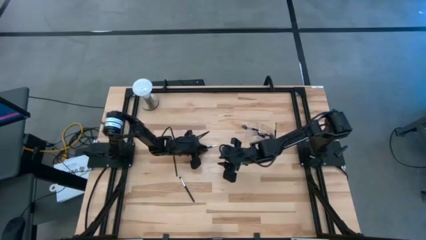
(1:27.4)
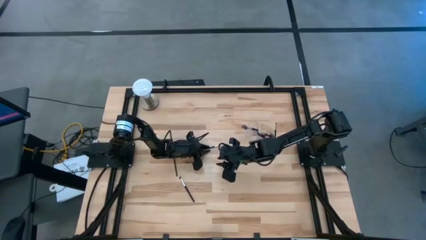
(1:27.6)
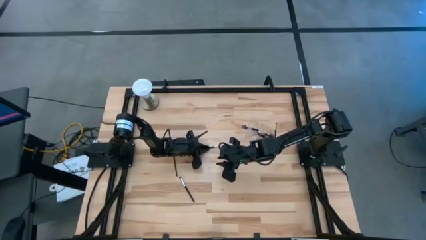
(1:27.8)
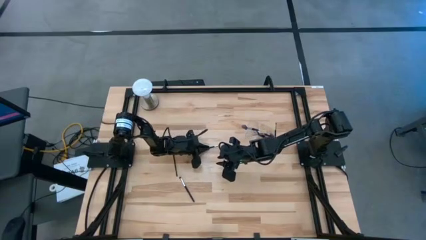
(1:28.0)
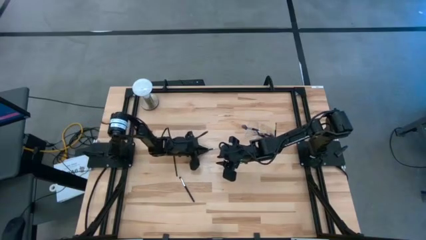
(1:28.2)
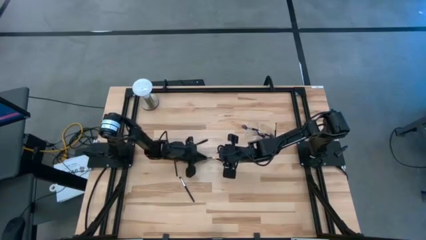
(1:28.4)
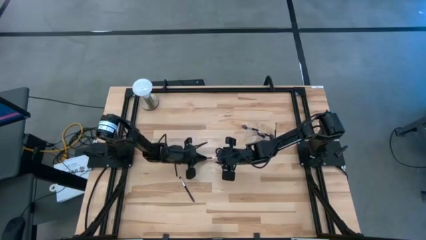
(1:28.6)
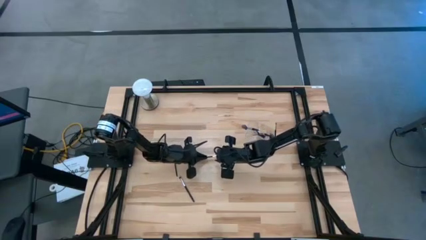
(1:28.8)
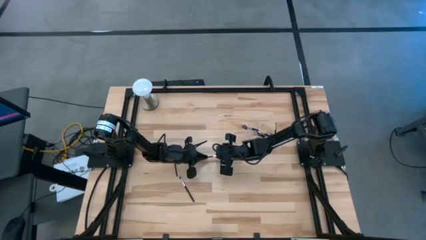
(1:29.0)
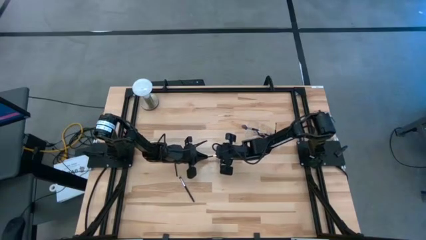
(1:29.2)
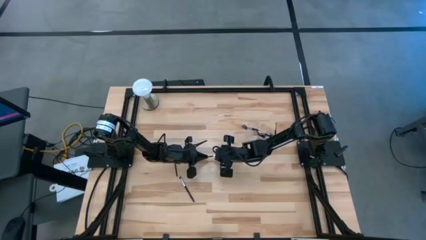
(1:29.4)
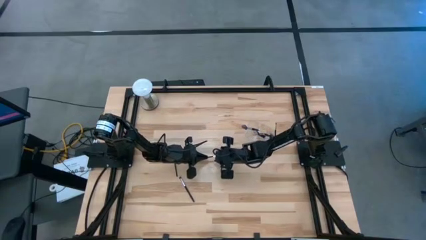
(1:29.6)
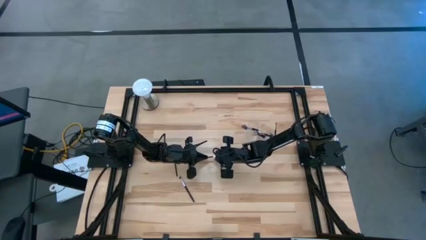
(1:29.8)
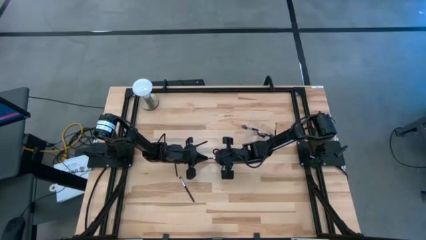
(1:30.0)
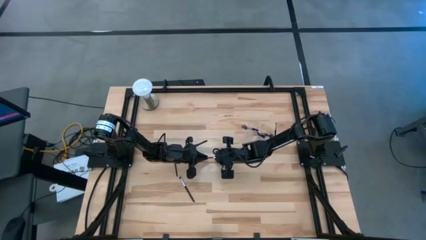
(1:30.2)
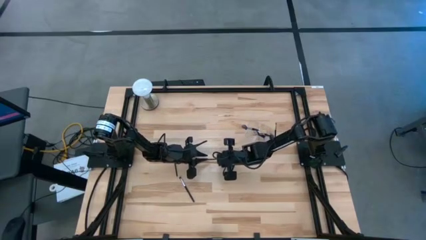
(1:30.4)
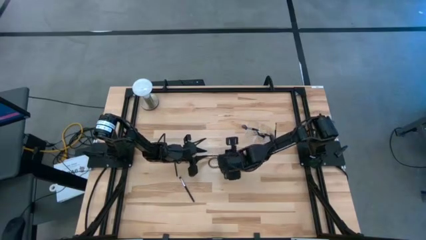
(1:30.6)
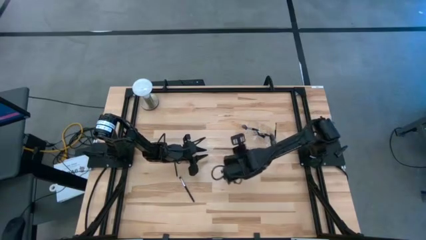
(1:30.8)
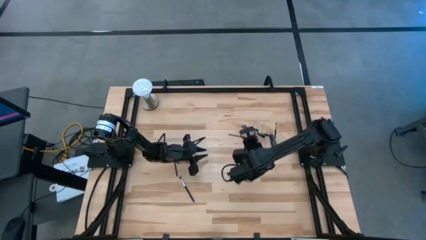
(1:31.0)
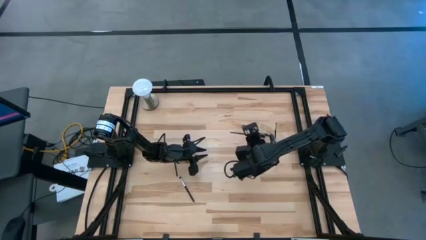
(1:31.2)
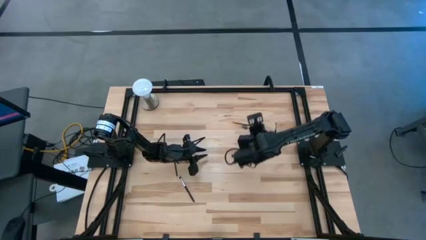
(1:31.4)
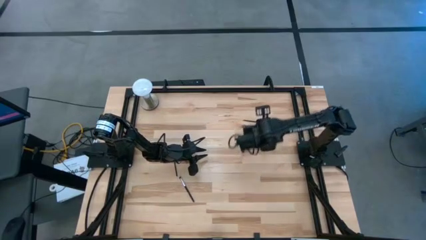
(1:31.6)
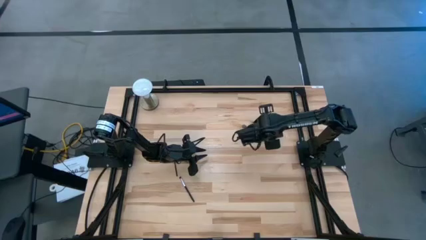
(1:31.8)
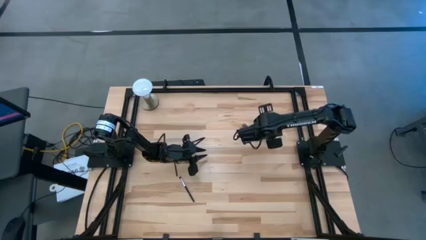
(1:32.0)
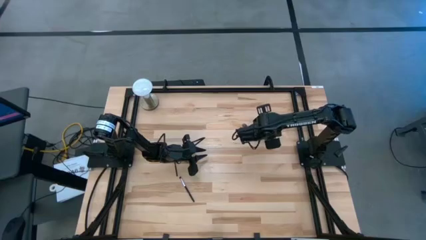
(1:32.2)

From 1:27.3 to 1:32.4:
Task: Pick & Place Makeup Supplies
Put the black makeup brush into the transparent organizer

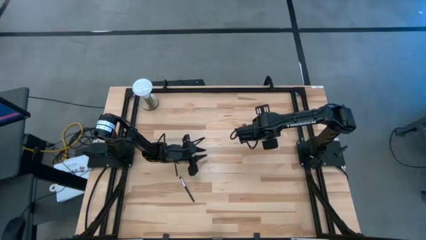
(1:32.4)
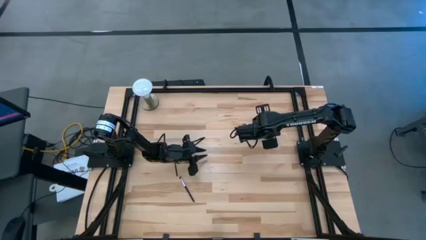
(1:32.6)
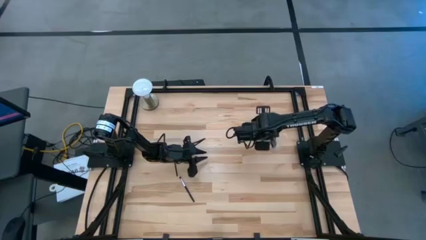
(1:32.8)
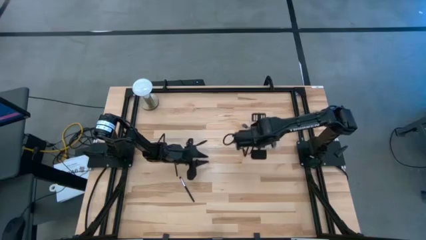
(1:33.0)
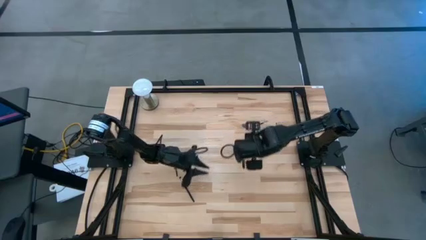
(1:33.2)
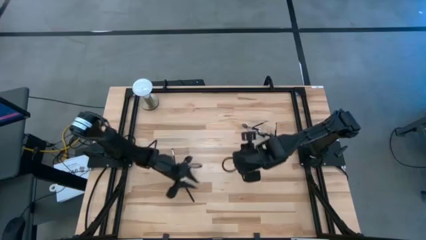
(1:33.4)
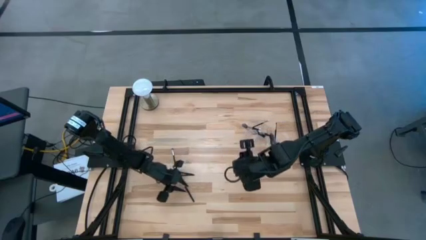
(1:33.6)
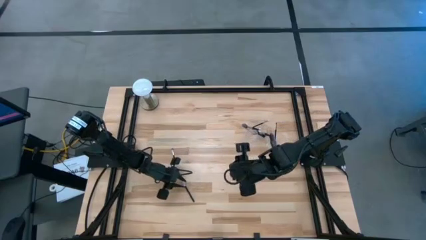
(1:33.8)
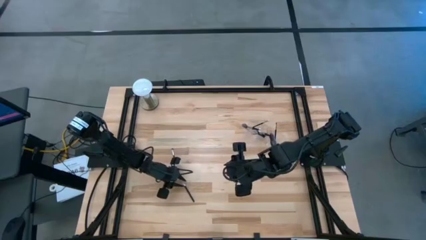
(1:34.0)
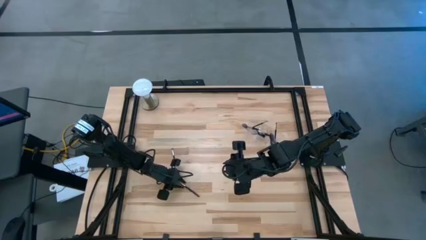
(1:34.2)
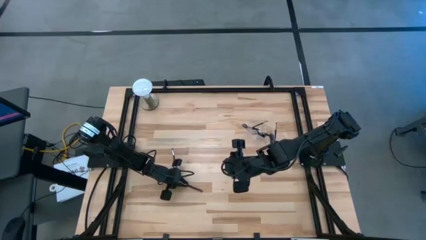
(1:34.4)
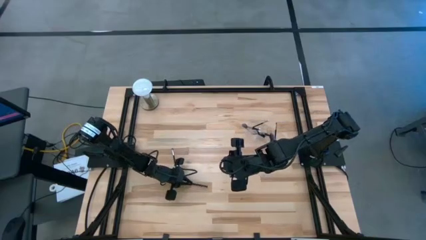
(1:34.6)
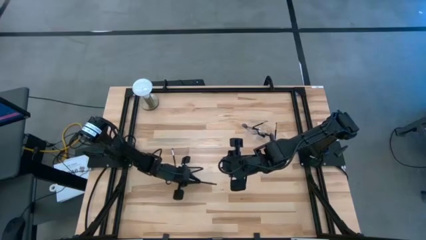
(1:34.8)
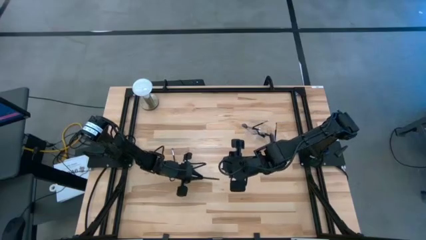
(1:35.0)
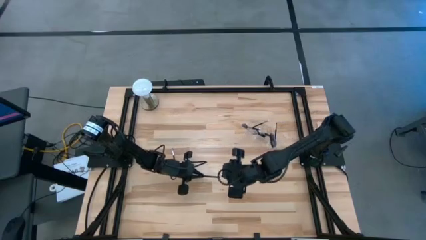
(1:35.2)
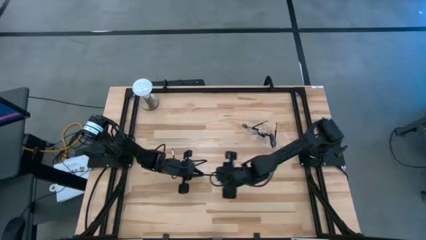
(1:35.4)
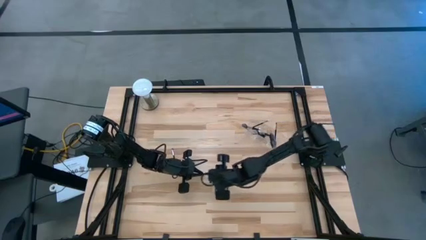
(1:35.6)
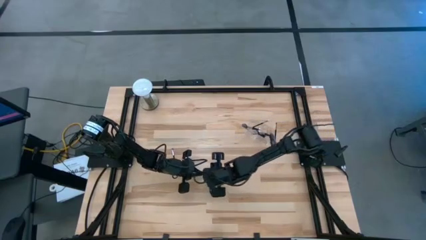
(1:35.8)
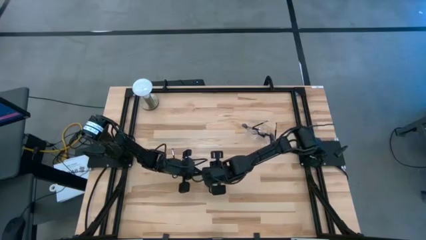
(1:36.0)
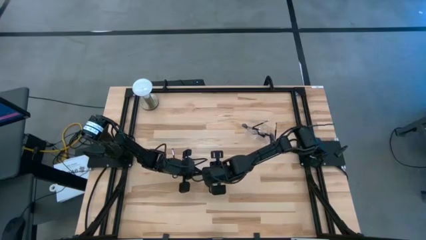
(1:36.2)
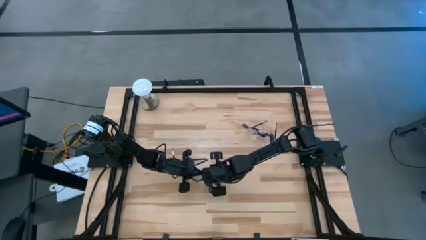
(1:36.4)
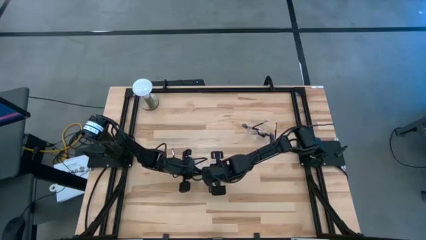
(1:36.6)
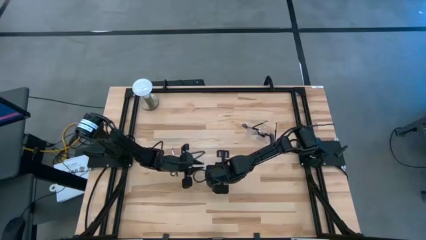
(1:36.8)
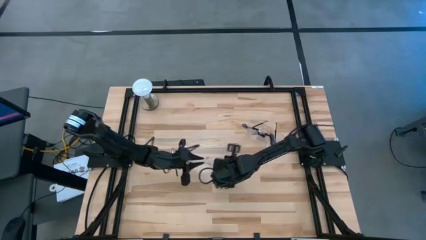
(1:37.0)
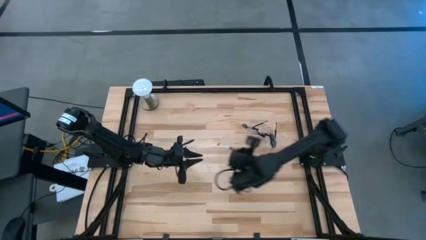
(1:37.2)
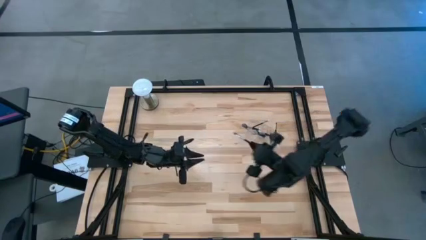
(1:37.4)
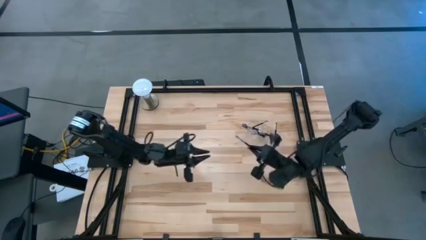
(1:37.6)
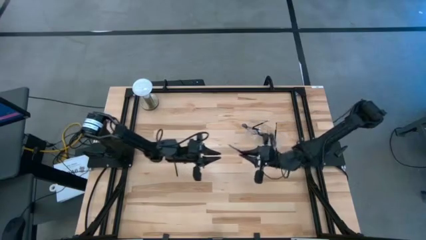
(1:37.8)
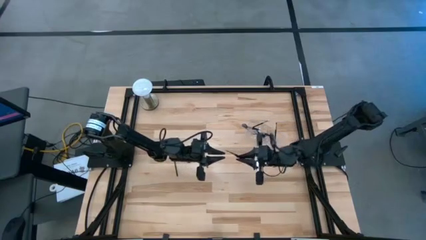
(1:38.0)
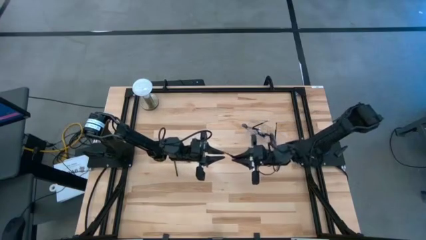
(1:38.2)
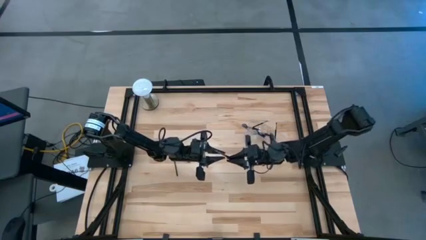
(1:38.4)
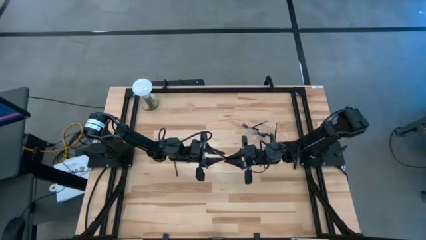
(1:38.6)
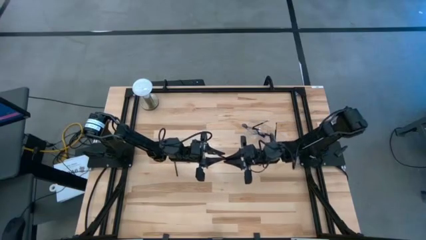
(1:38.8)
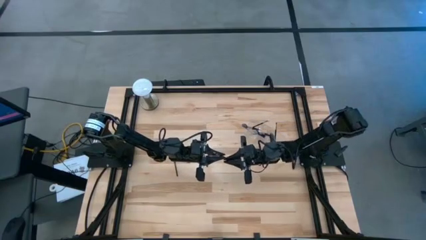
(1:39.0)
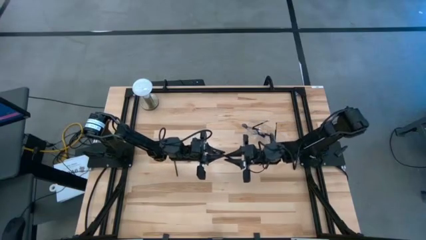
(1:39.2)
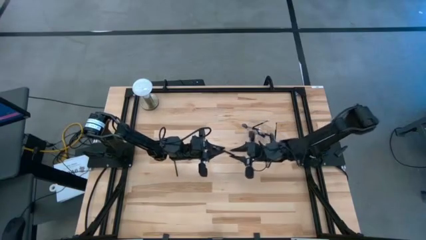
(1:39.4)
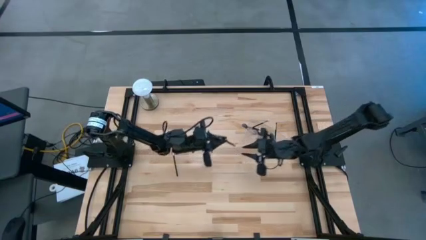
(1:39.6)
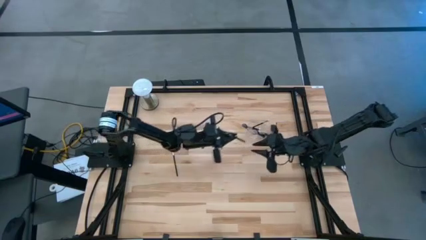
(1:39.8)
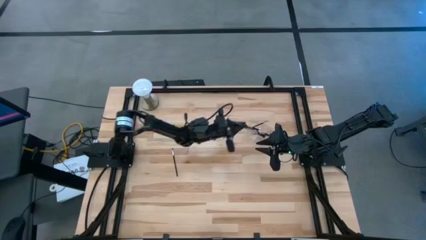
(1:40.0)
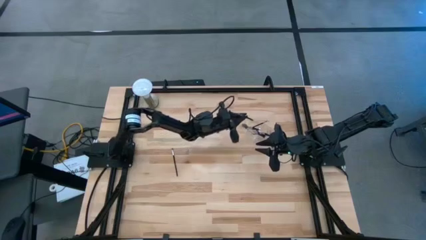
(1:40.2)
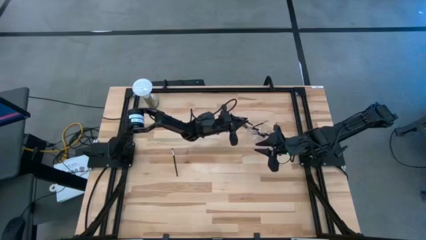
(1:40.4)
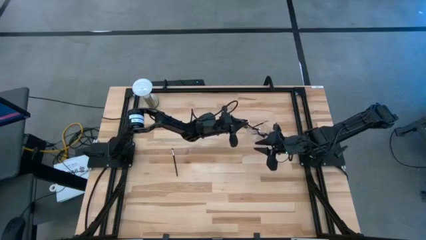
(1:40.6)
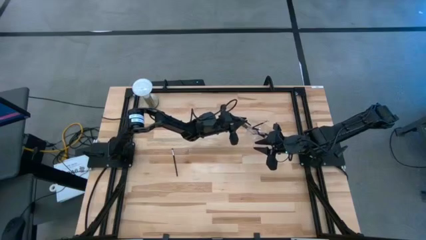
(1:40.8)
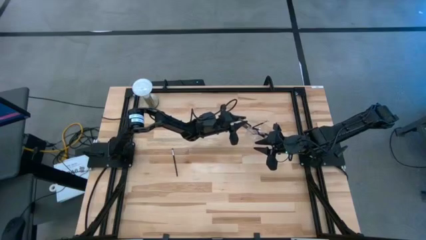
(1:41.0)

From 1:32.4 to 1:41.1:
Put the black makeup brush into the transparent organizer

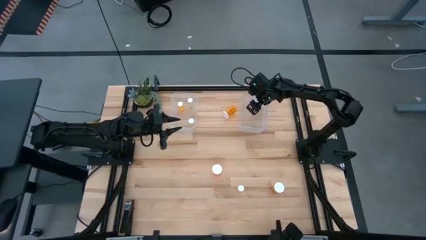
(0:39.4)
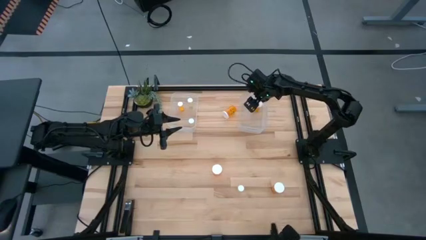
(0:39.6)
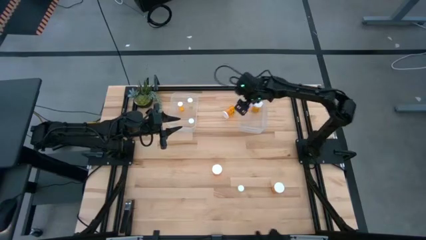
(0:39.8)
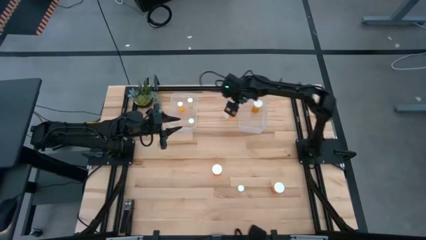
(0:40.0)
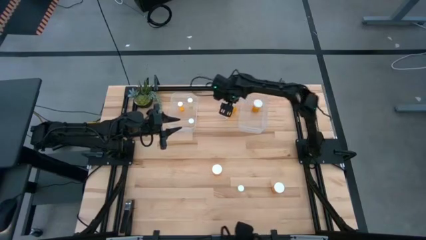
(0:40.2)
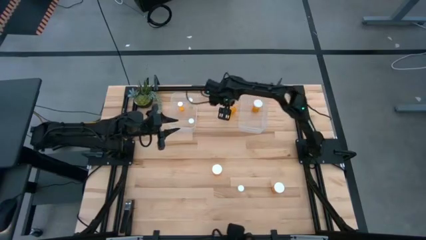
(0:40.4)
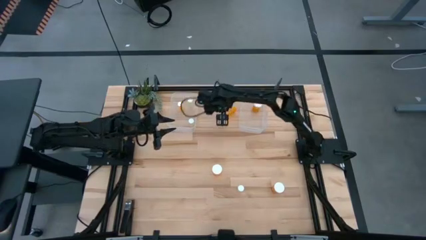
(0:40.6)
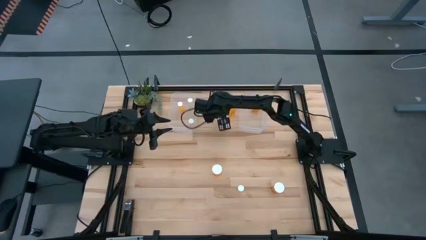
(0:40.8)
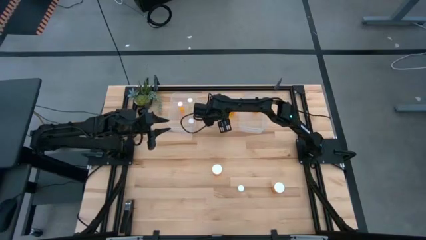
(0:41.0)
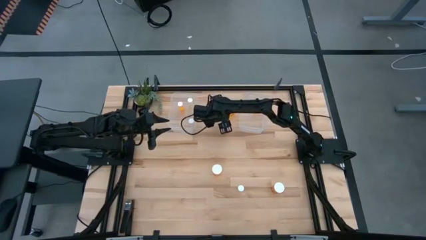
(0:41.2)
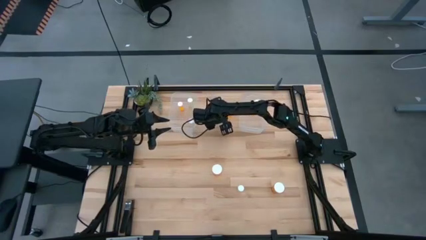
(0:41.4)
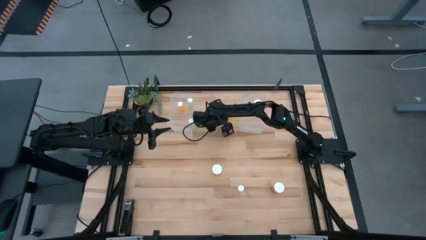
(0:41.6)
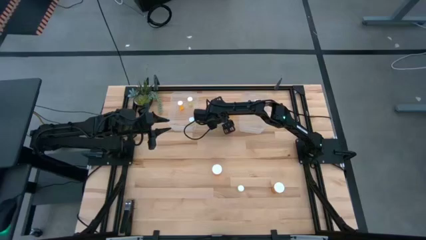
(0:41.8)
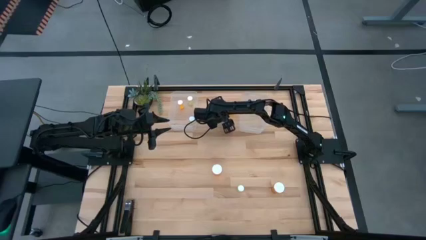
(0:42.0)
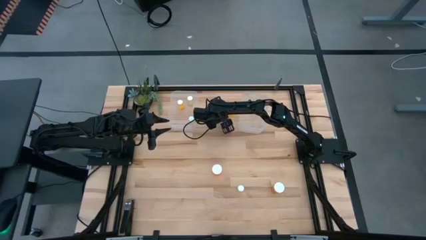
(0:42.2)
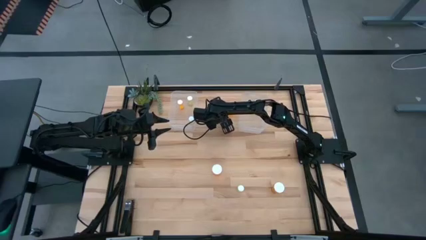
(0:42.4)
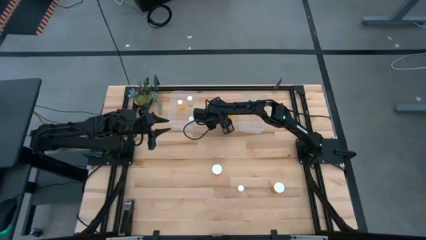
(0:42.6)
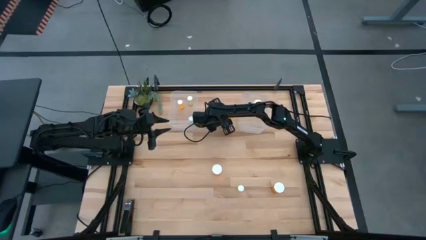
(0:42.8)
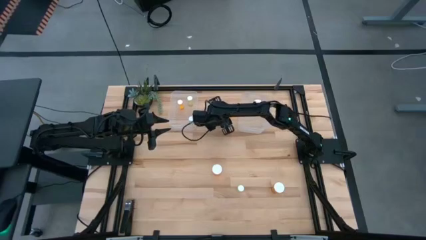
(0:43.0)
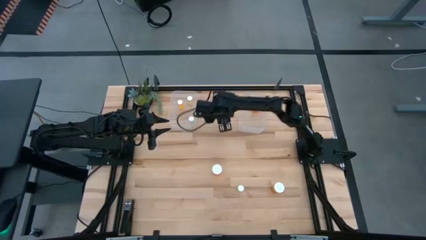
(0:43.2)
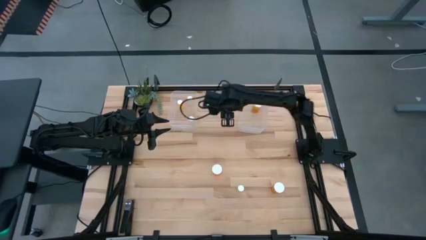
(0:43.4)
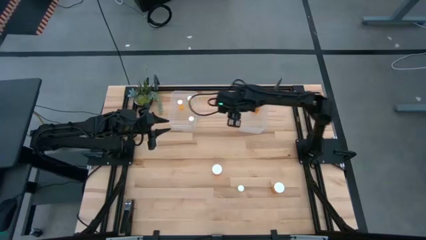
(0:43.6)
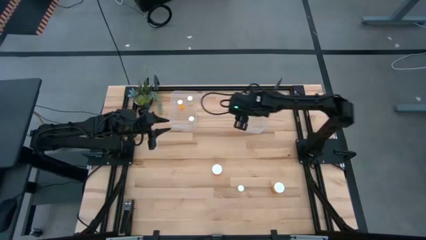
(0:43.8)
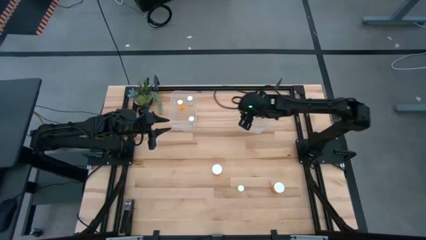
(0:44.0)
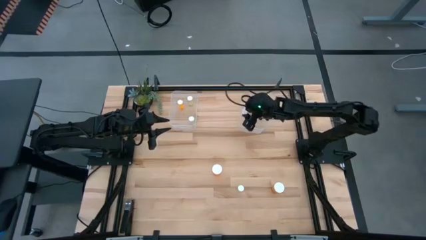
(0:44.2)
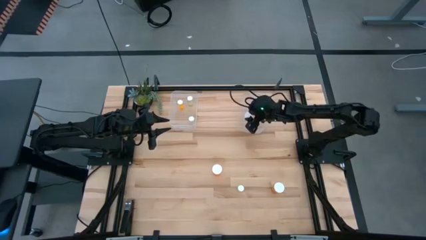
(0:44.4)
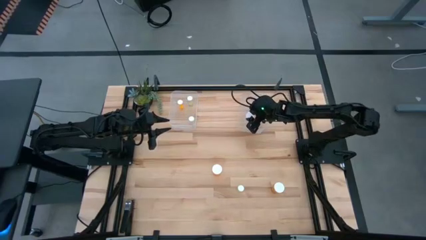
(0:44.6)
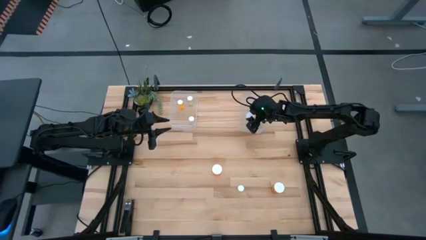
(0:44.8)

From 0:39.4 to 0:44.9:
Task: Pick and place medicine bottles into bin by pill shape (circle, oval)
Put the large orange pill bottle into the right transparent bin
